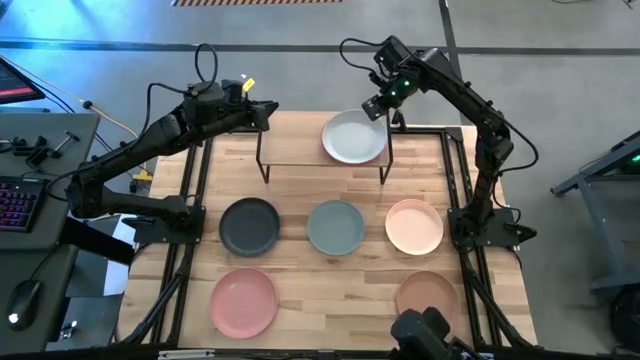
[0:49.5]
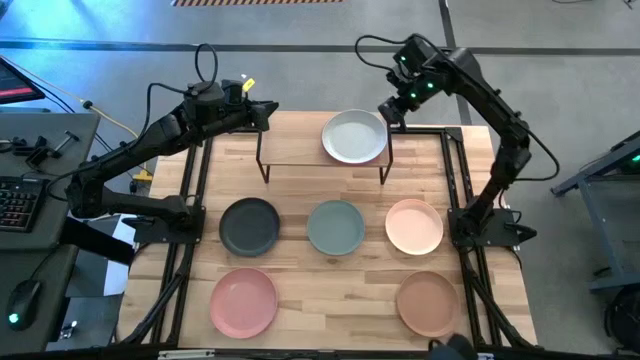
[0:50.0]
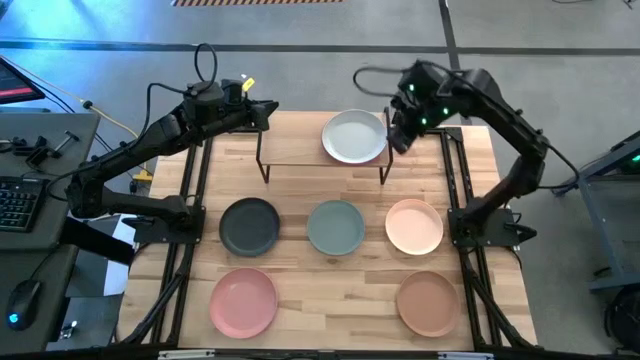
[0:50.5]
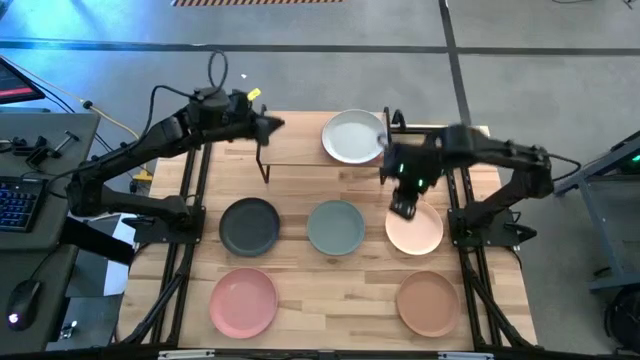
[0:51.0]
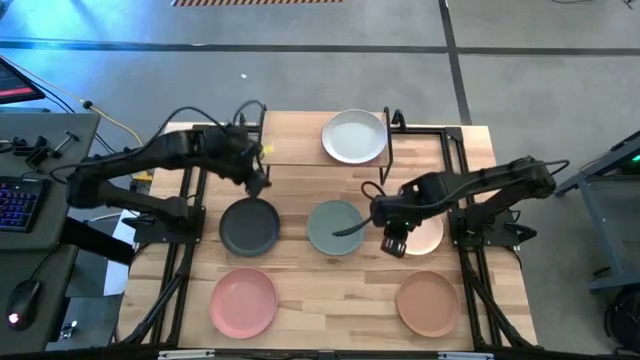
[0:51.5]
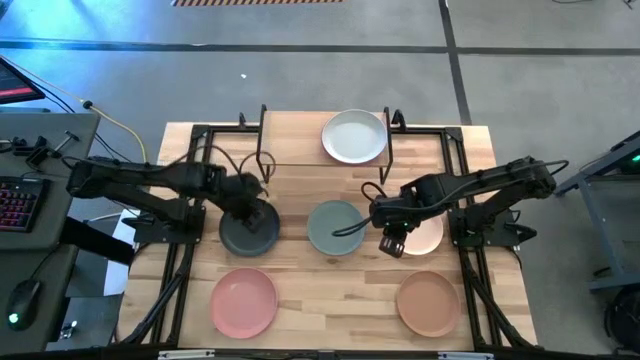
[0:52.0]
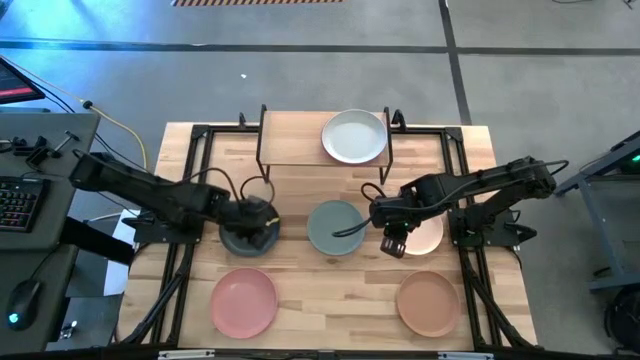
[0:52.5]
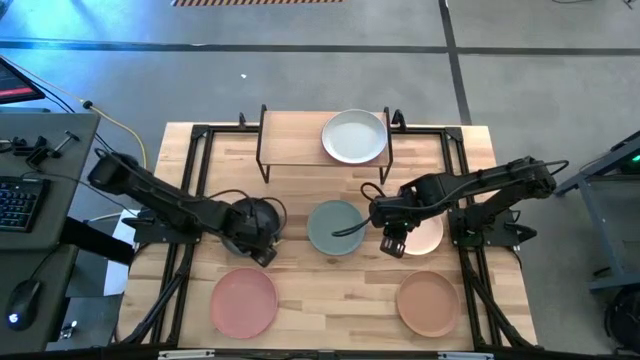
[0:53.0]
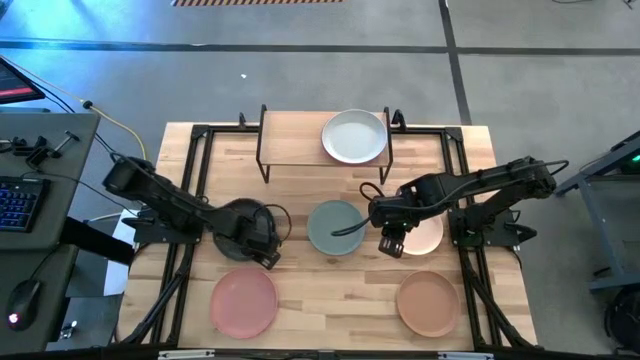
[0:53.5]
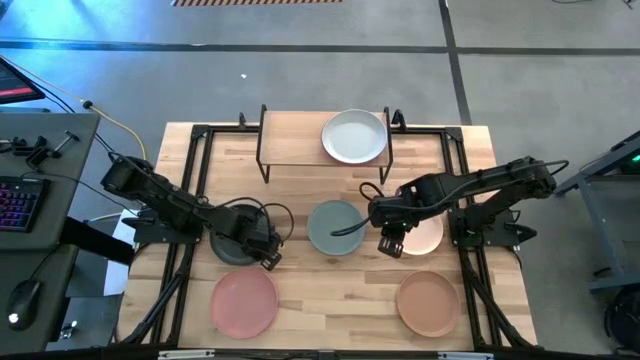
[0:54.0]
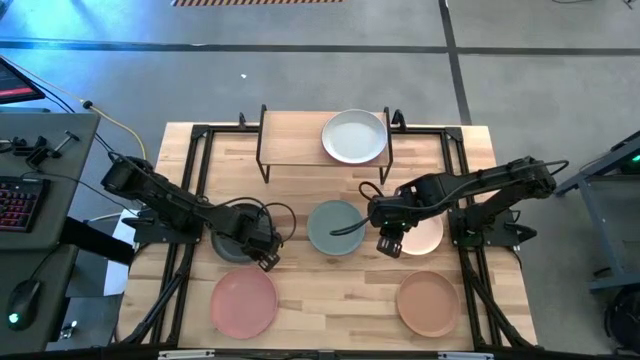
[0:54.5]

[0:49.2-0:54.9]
Task: Place and stack plates onto a shelf
Stack the black plate on top of the gray plate on the shelf

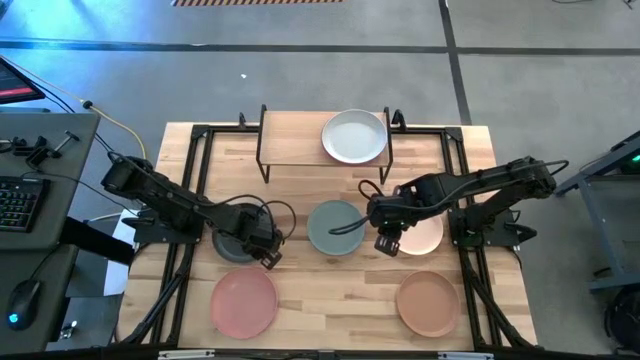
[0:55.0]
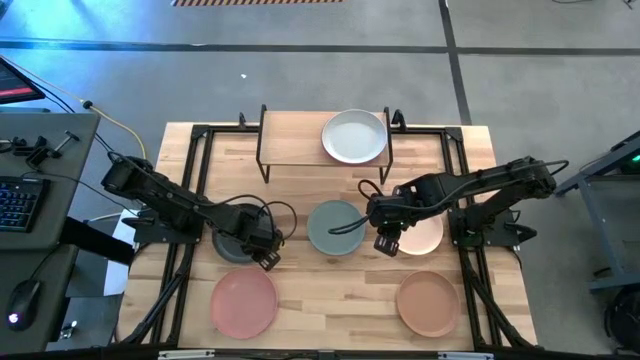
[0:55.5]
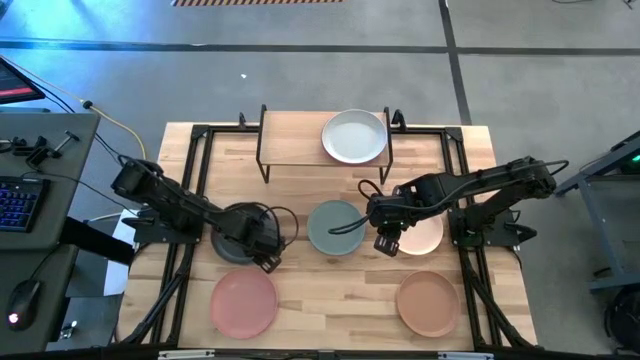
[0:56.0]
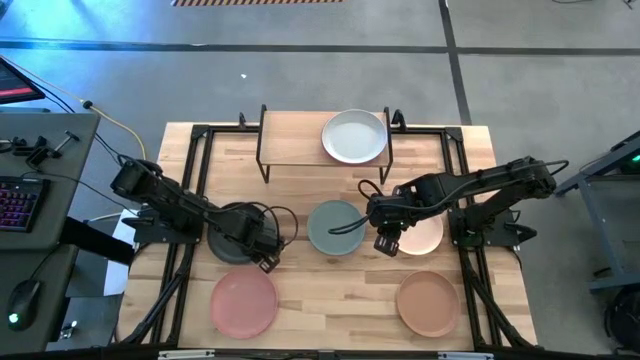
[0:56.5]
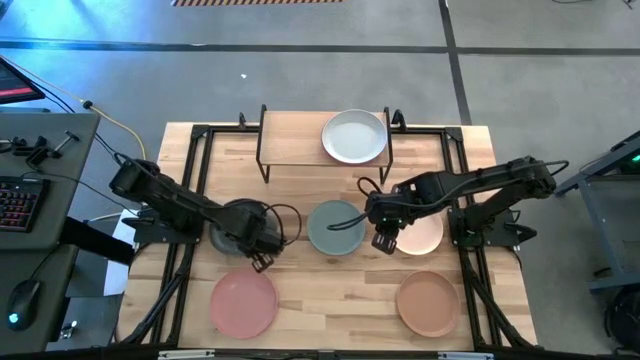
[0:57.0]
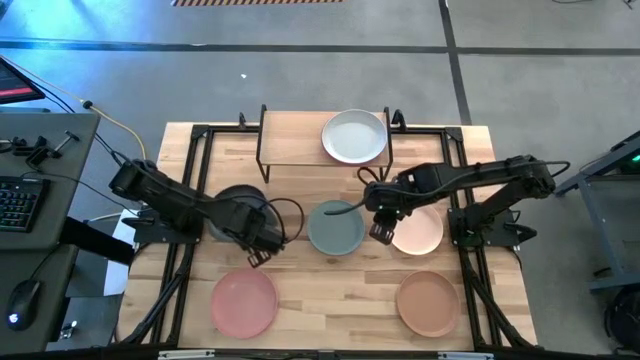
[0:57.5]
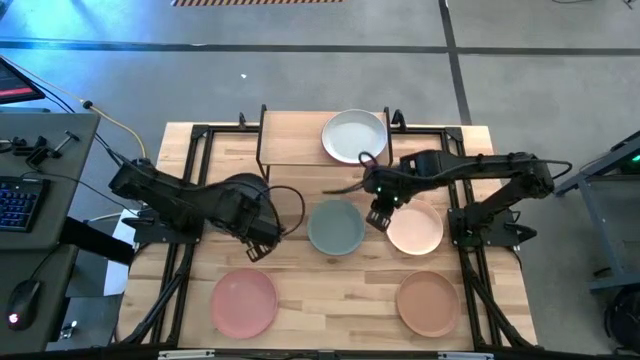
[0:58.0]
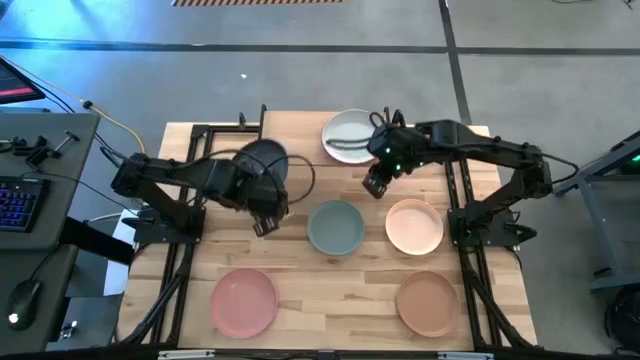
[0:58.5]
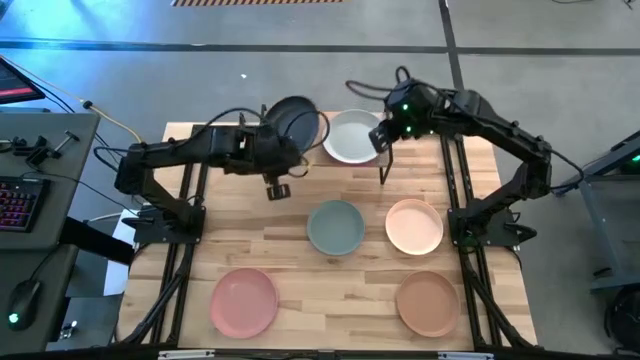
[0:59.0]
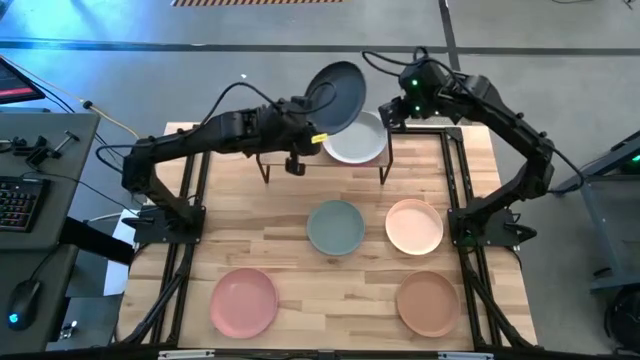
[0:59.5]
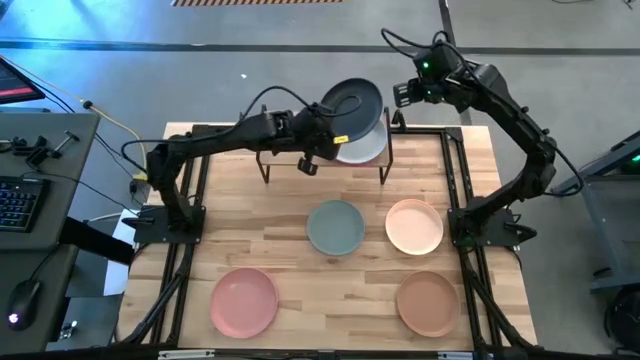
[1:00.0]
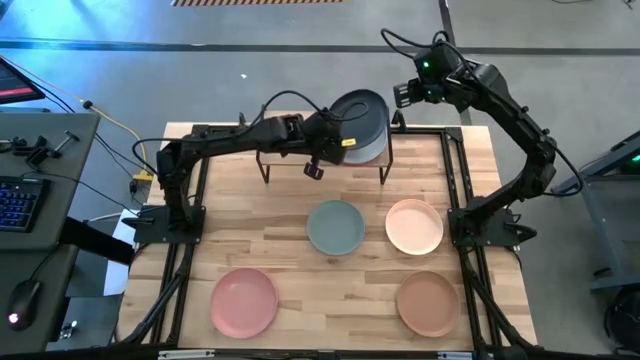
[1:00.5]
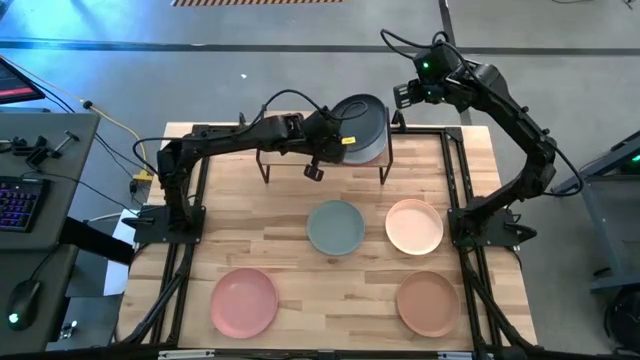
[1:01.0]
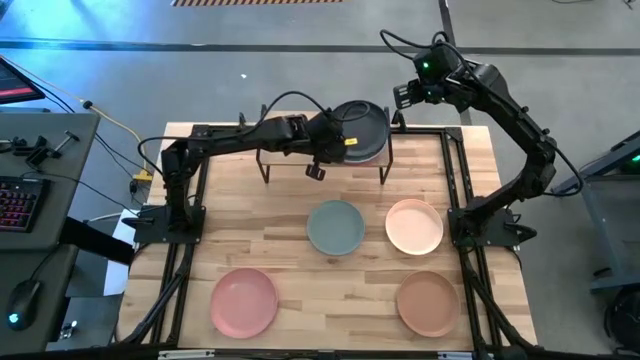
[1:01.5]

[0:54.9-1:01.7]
Stack the black plate on top of the white plate on the shelf

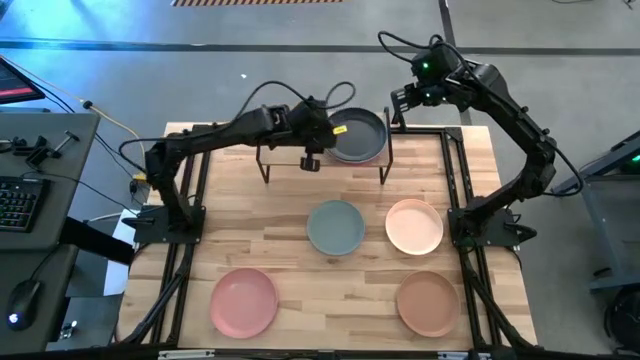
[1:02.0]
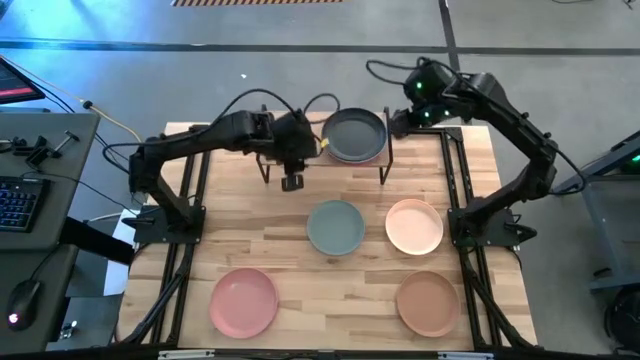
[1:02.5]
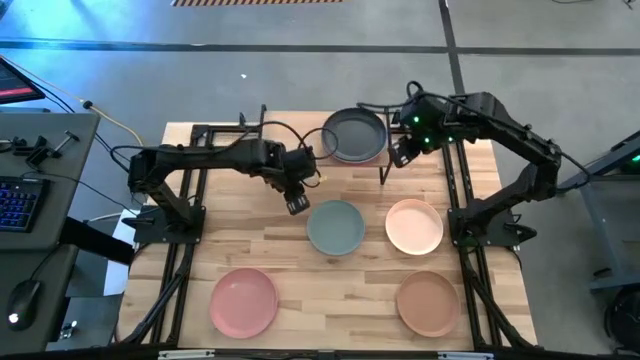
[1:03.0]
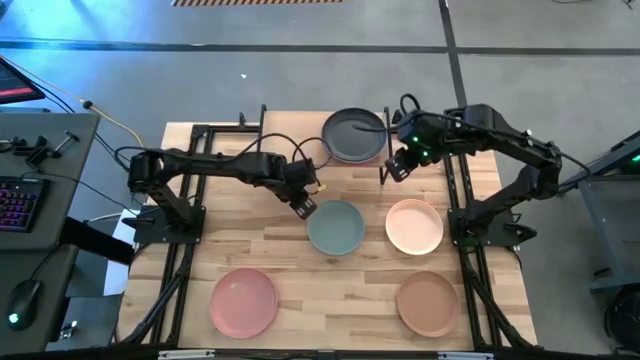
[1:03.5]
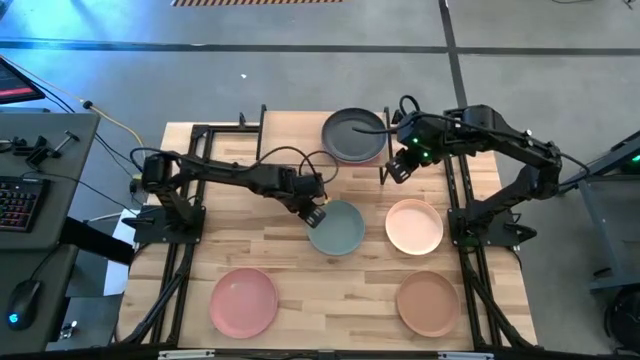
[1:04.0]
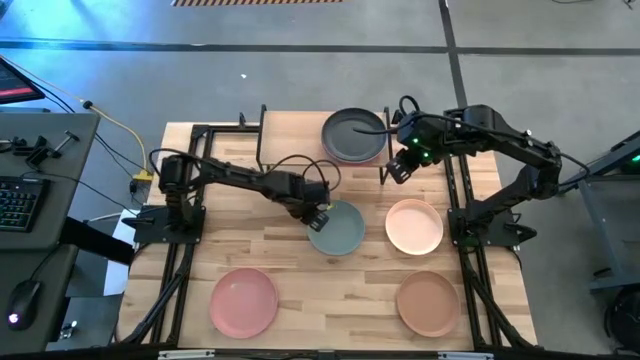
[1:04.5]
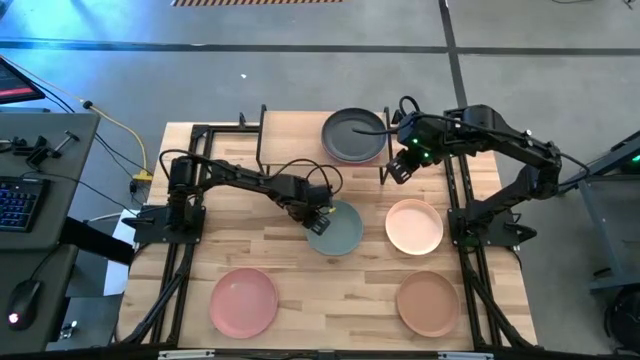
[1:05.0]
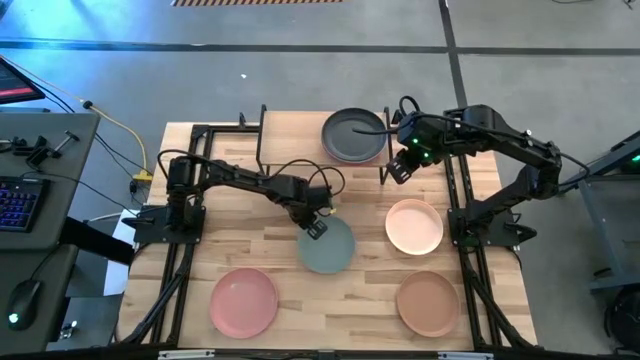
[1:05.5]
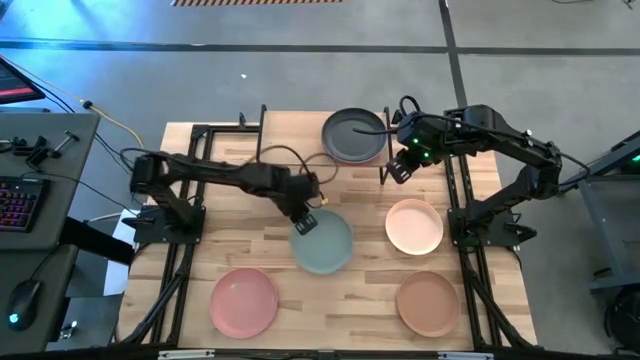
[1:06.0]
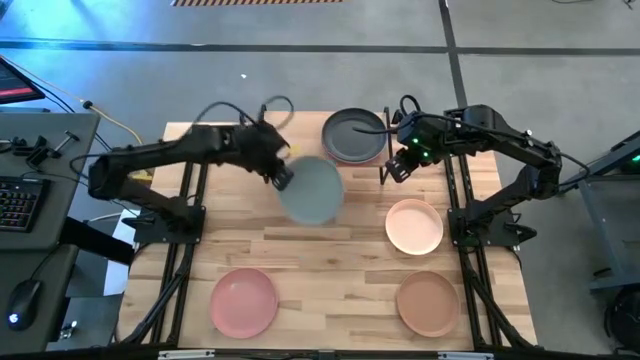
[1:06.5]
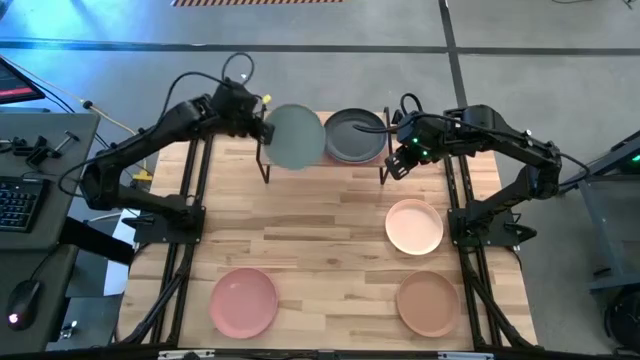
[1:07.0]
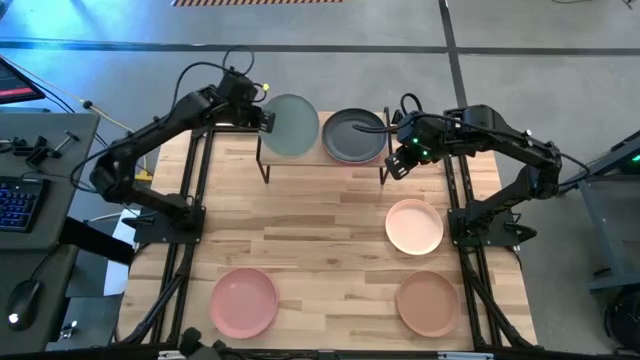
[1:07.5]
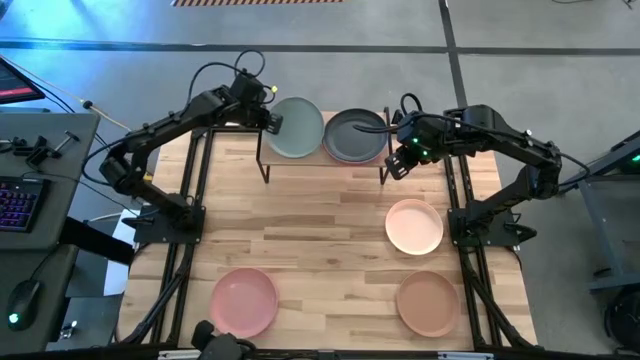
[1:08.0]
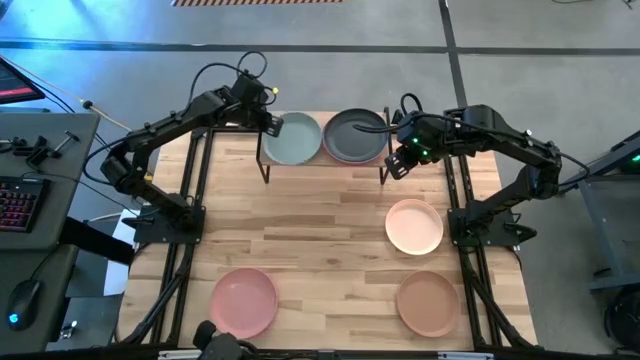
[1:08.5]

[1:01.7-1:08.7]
Put the gray plate on the shelf

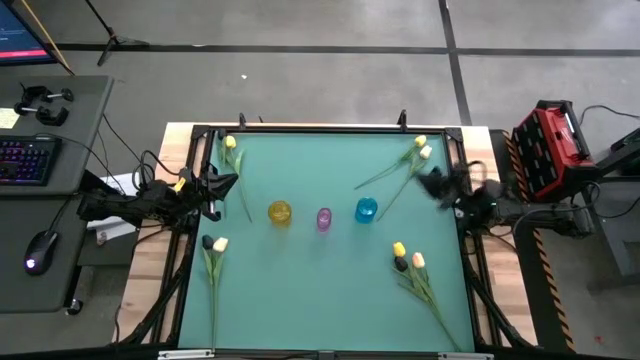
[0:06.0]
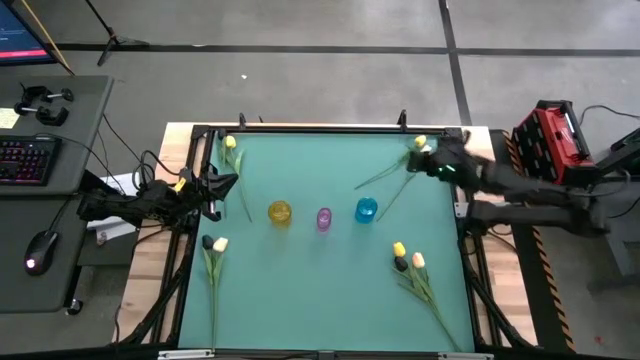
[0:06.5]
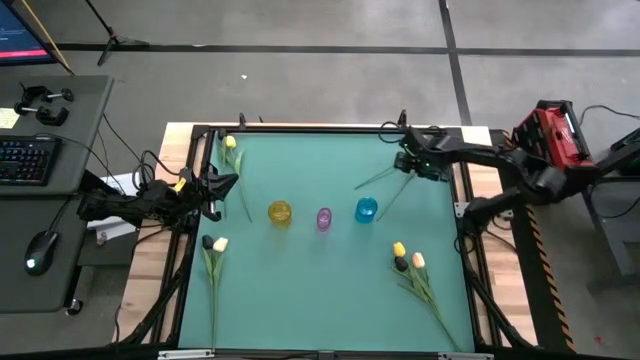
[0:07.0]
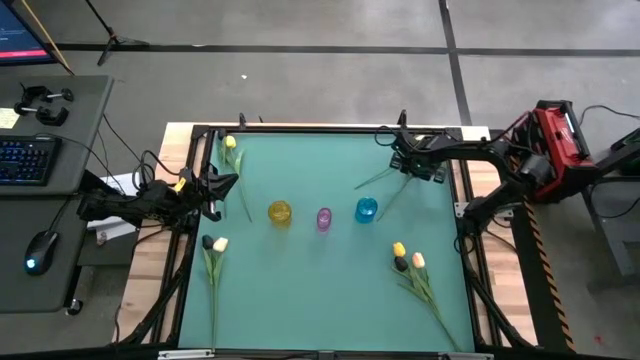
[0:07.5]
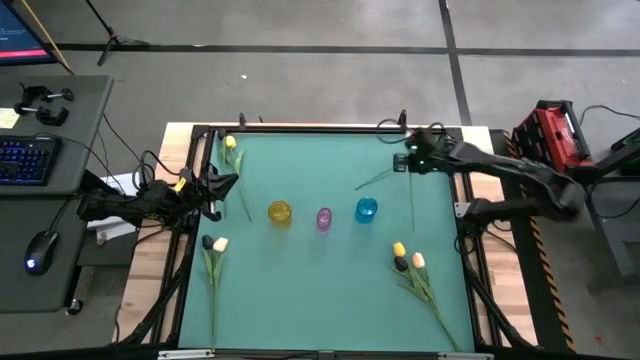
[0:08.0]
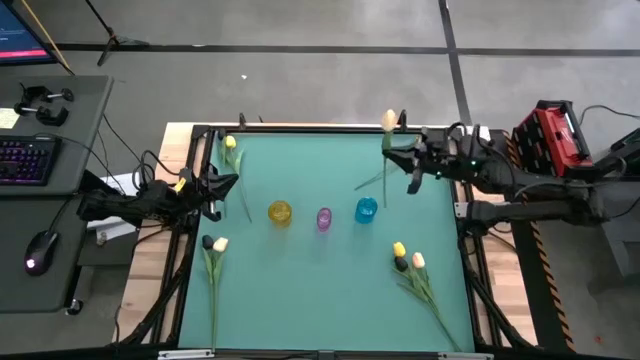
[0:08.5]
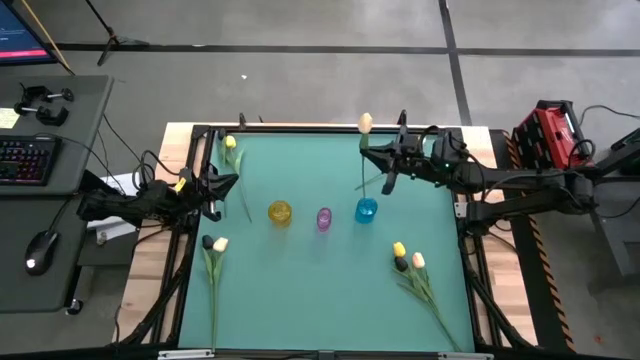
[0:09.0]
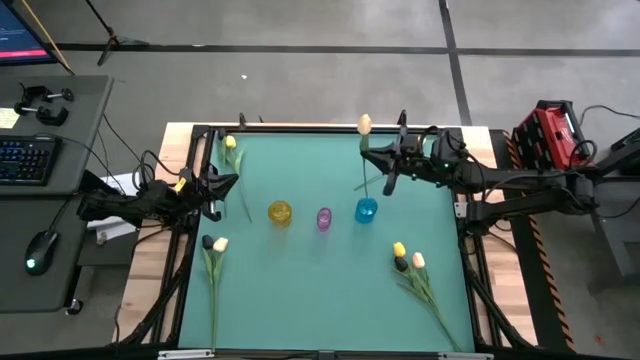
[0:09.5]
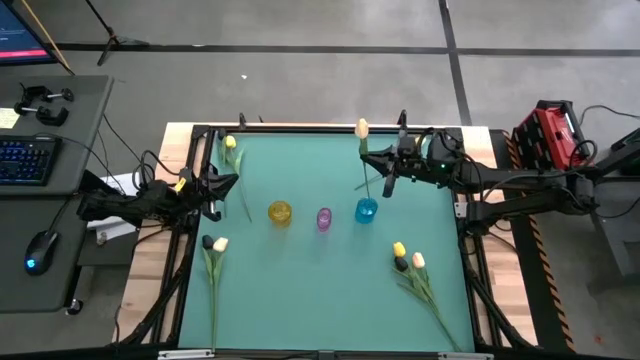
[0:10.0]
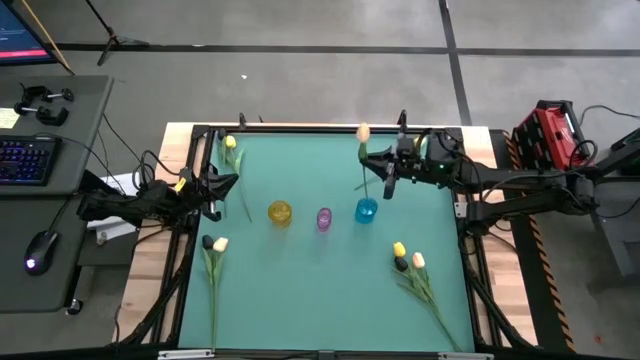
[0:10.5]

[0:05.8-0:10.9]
Task: Sort flowers into vase by color
Put the top light orange tulip into the blue flower vase
